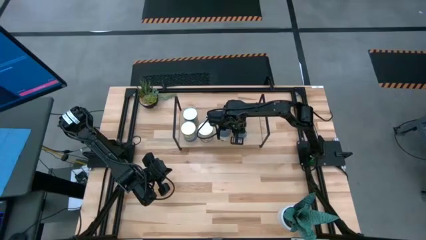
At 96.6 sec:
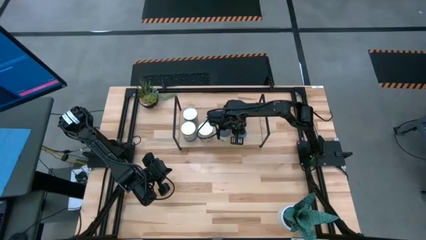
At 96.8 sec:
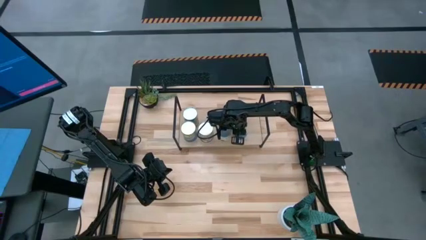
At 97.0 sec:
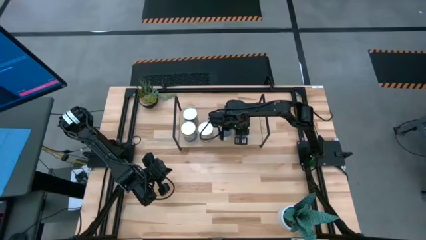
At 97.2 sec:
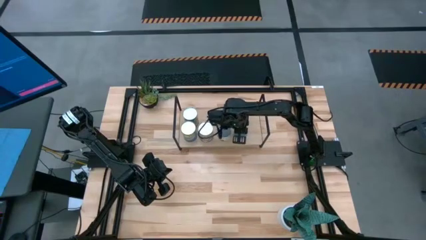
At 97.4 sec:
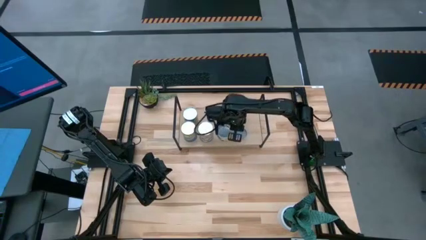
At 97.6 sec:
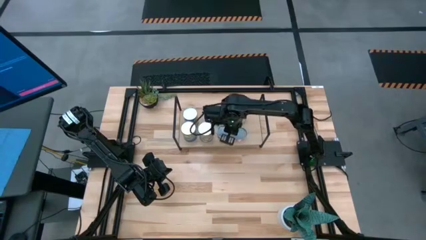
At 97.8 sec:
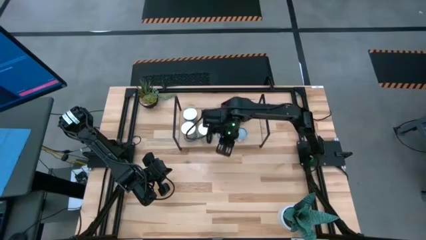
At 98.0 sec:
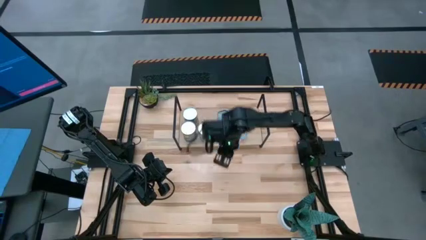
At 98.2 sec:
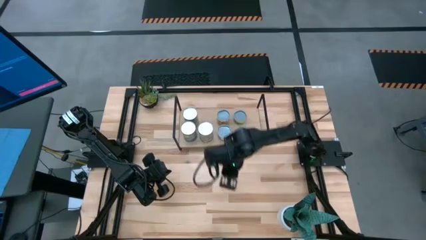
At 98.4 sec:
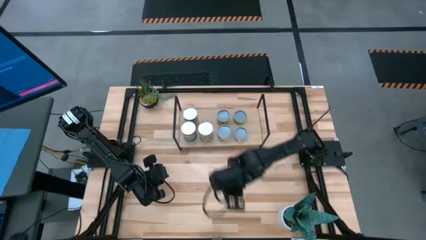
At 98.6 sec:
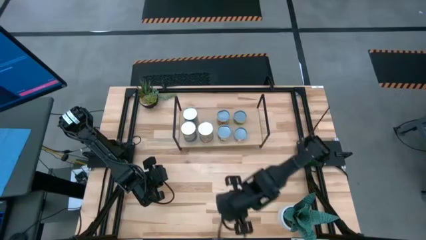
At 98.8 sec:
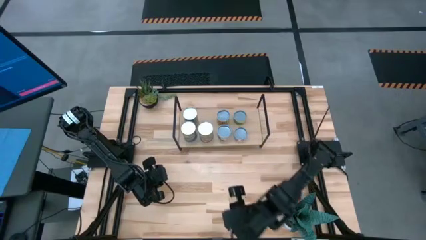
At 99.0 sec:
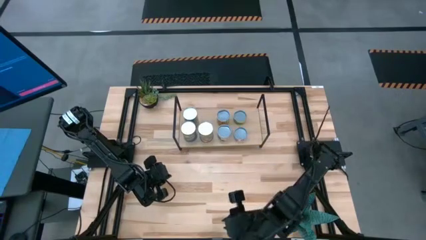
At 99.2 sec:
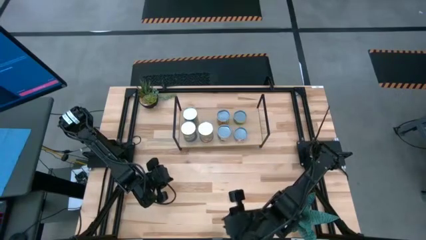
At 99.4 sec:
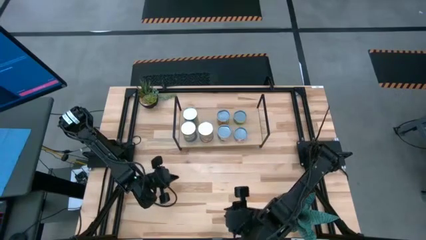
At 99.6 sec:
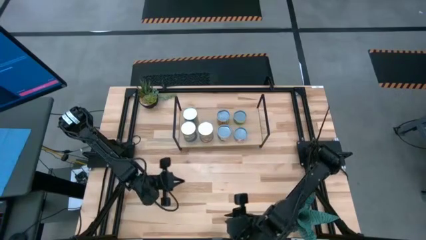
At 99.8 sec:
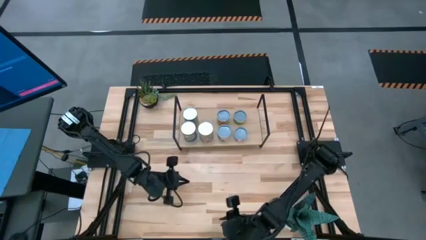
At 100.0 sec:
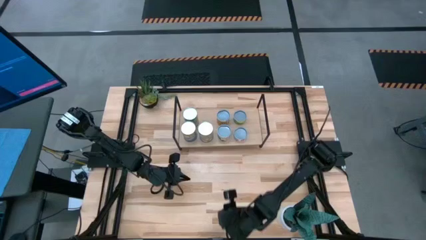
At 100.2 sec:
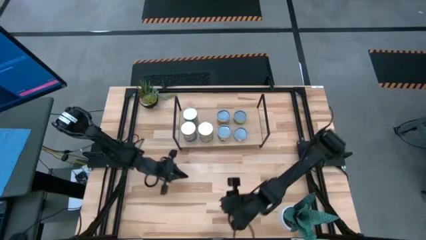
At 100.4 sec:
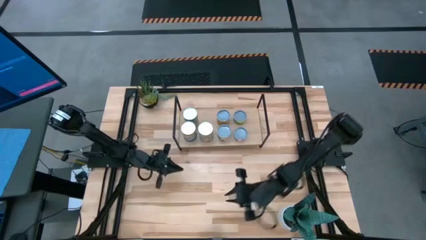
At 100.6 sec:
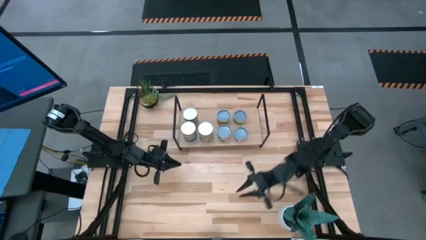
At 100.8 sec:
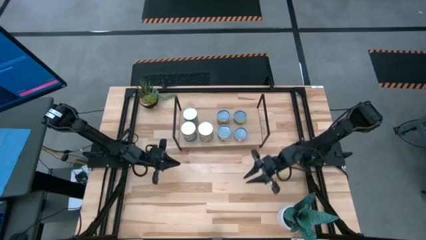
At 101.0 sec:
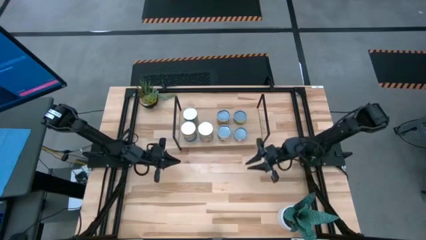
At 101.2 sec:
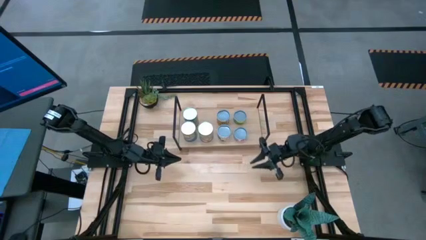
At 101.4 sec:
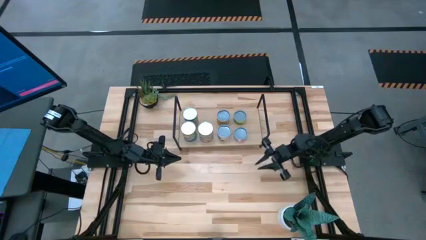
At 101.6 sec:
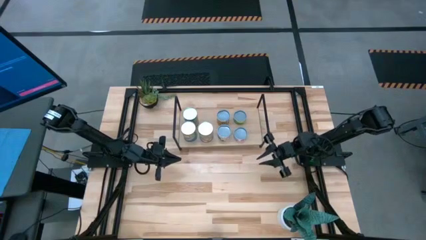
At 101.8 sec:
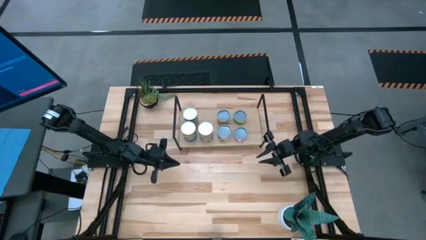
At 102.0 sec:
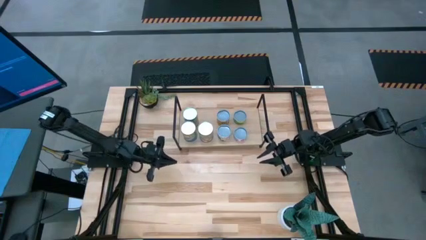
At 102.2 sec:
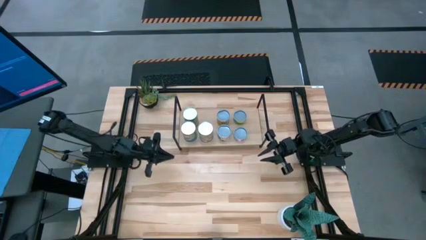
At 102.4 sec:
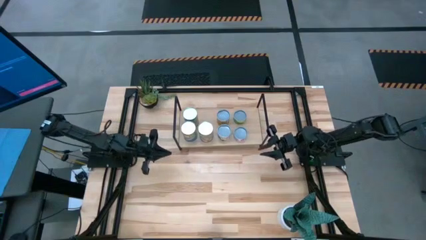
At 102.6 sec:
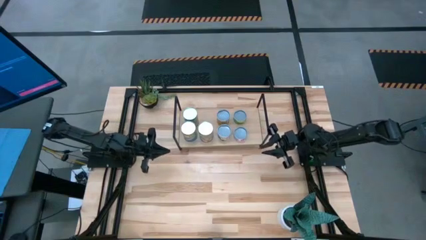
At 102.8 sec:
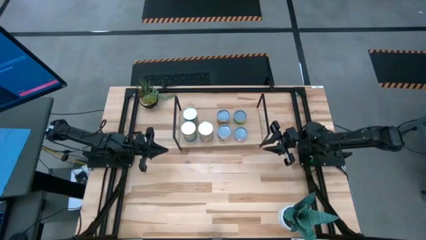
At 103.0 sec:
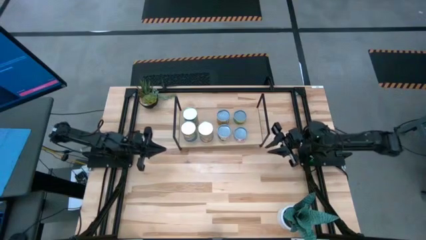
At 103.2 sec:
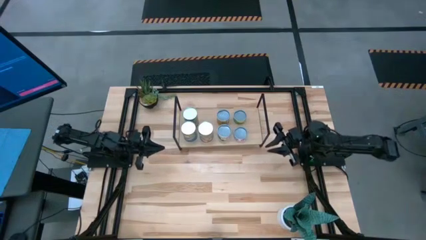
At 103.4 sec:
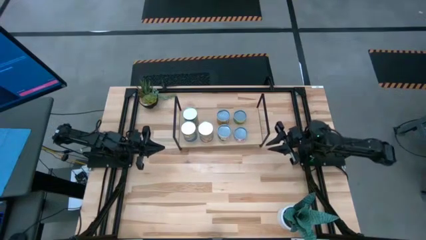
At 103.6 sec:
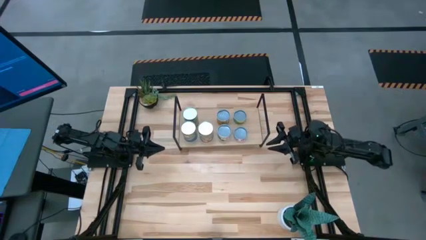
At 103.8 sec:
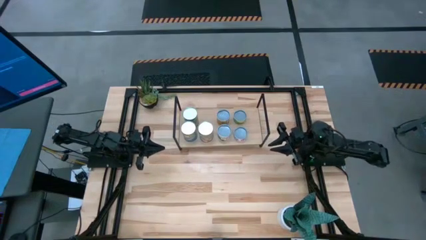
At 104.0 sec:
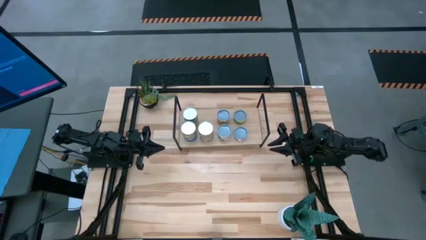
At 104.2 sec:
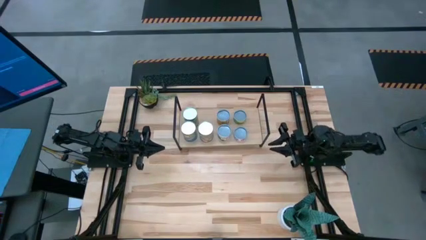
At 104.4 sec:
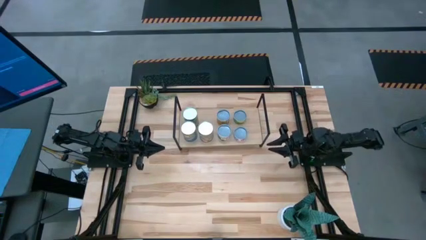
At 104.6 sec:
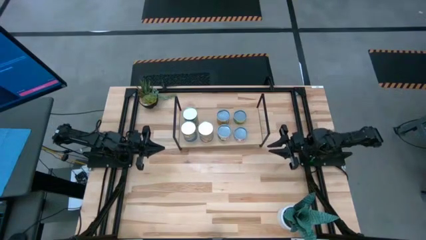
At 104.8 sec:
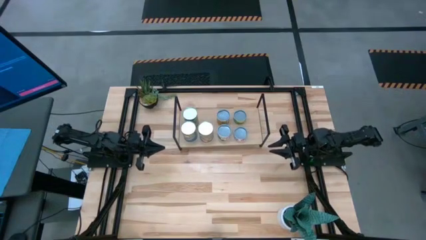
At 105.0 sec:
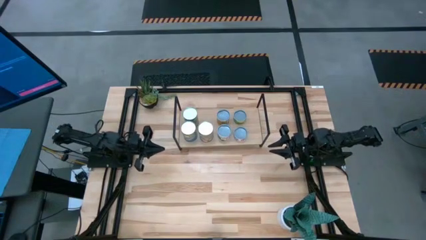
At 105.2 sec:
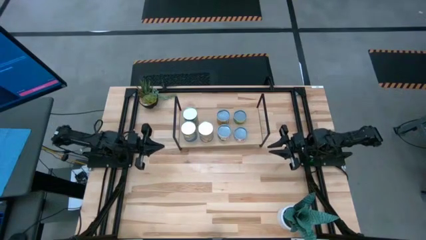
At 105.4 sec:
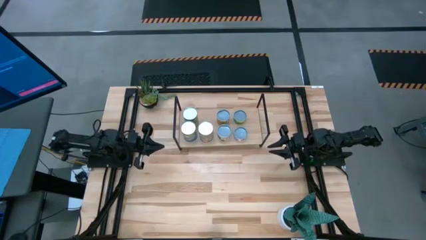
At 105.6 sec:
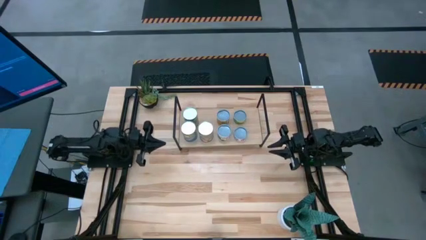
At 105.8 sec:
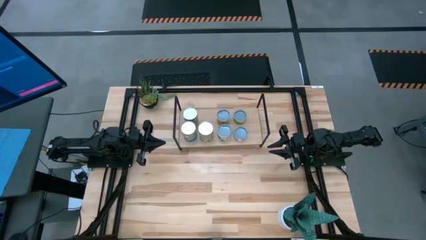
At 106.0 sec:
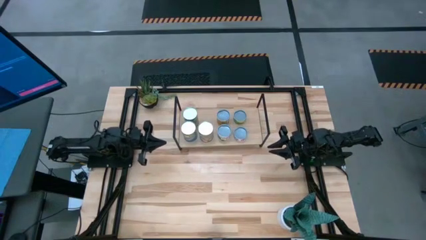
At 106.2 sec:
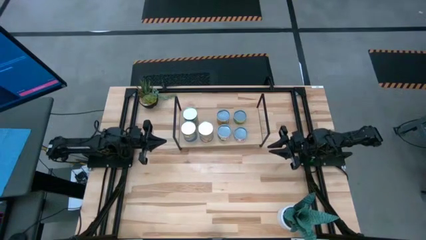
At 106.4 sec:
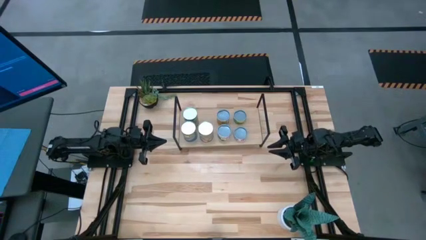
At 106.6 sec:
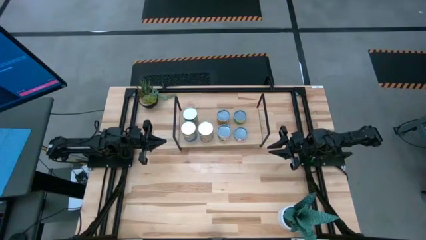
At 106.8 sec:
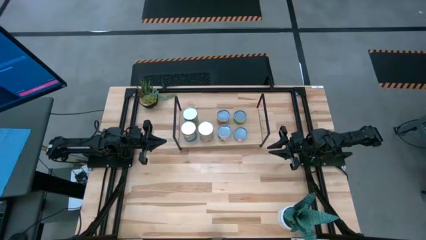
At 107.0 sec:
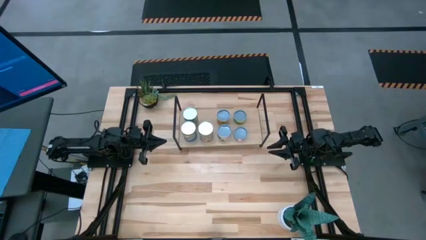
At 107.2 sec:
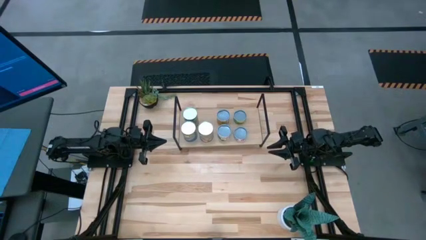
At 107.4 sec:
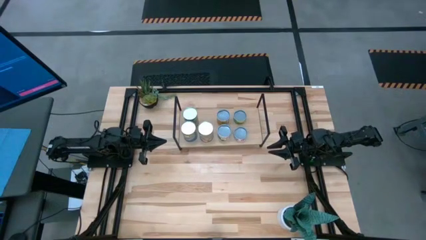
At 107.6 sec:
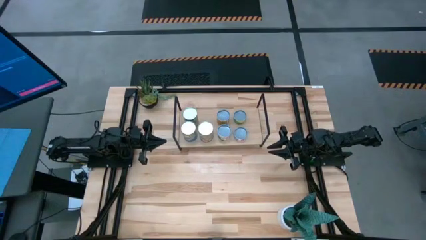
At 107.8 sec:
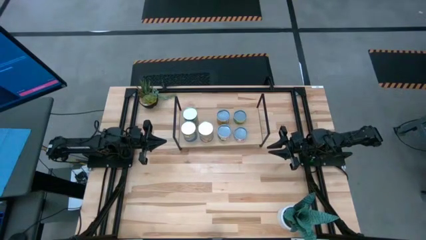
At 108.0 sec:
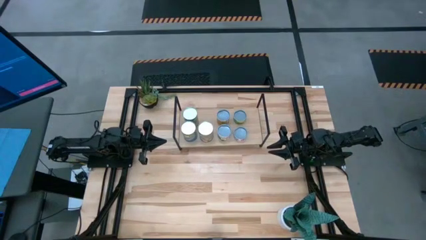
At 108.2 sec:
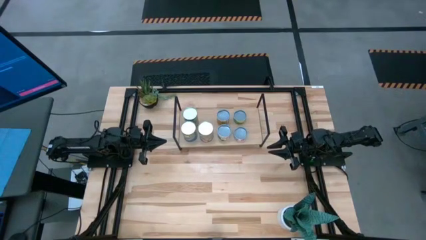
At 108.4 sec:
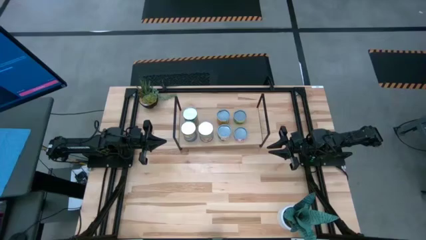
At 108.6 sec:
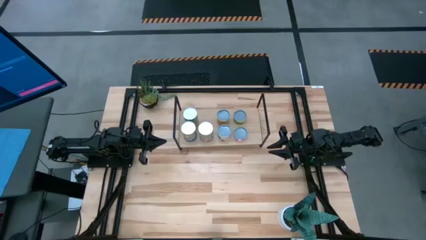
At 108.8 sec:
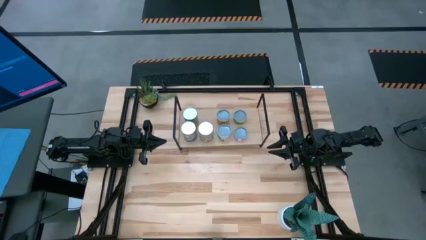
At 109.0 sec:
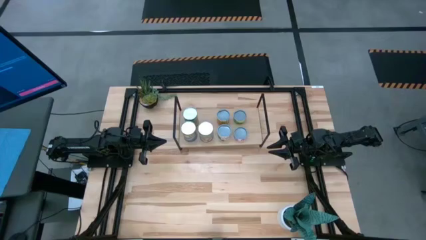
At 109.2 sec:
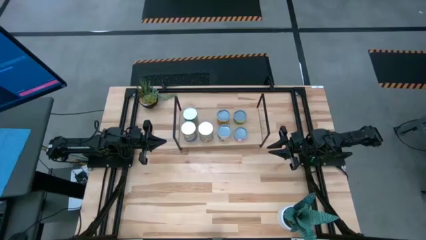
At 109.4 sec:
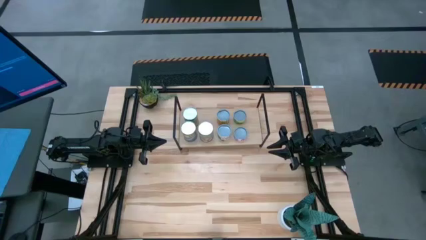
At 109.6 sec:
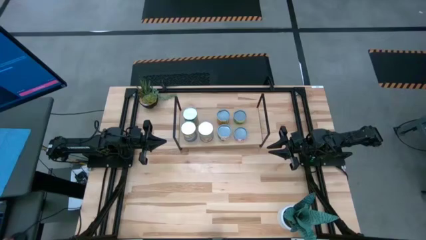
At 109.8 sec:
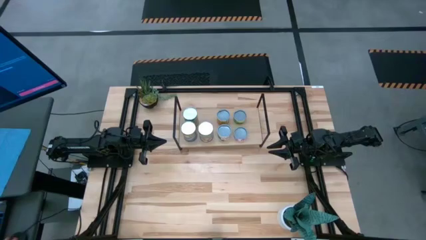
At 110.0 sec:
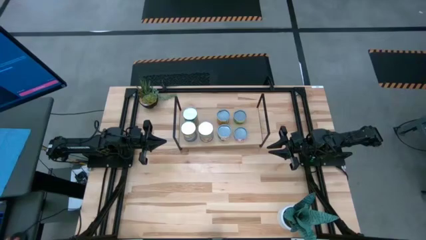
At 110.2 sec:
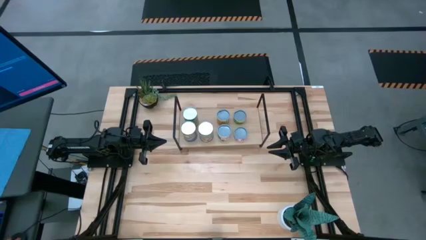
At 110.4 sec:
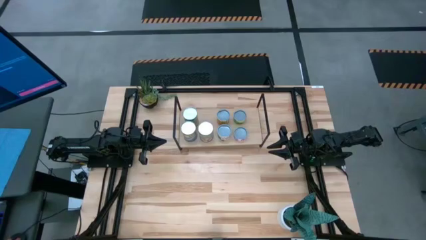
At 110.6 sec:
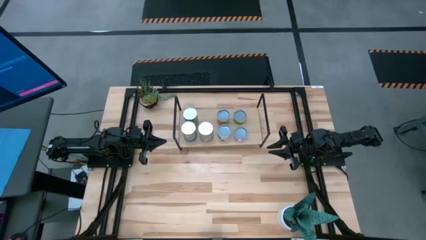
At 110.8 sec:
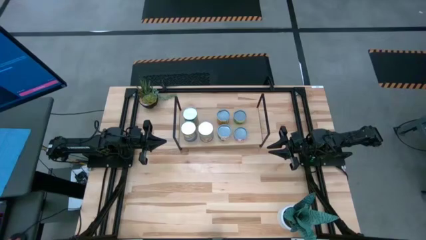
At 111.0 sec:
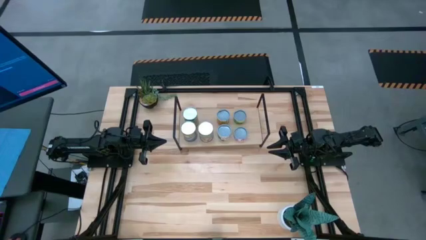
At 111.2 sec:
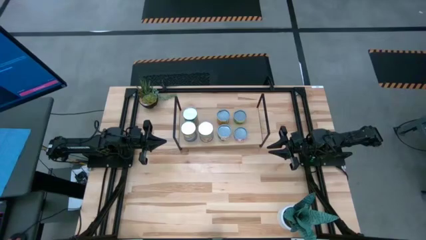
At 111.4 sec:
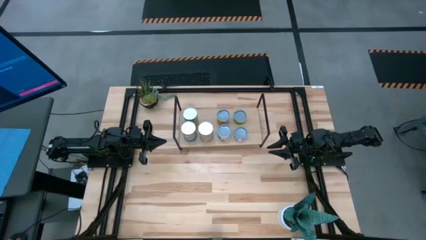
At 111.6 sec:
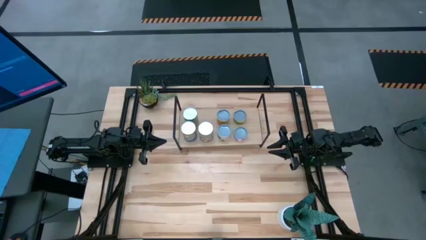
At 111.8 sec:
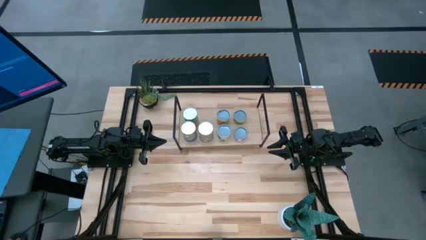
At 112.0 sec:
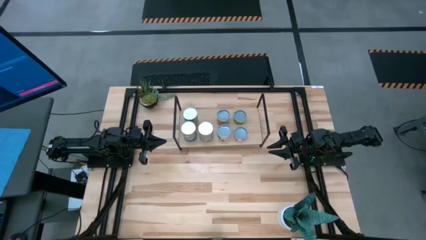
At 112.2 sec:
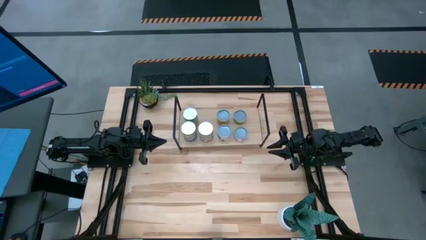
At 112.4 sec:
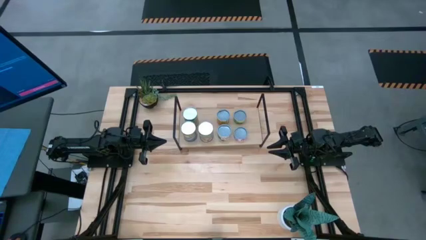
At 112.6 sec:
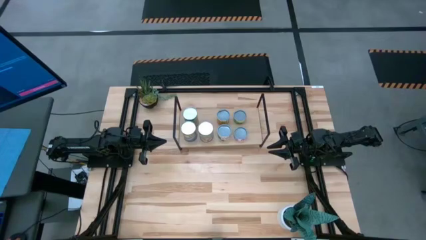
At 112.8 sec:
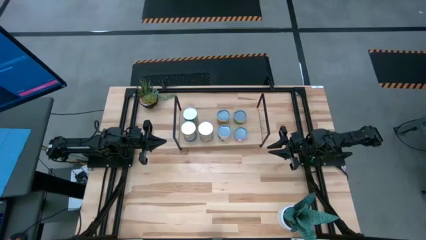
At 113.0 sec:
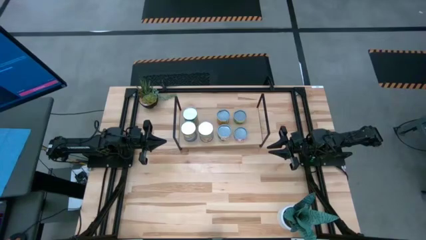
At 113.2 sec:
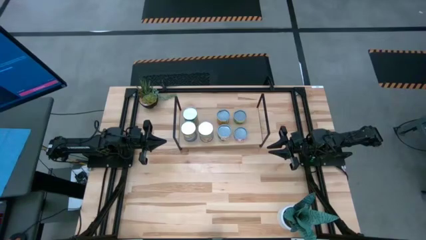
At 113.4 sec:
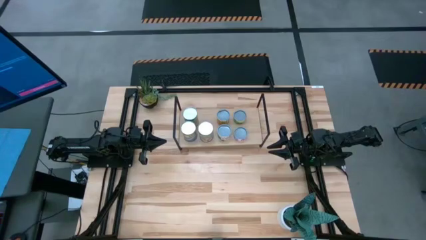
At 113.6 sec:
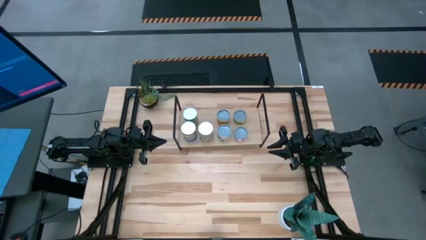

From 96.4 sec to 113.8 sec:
Task: Pick and place cans onto a shelf
Return to Home Position
